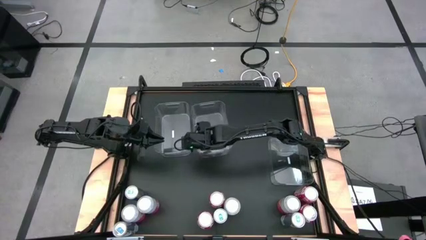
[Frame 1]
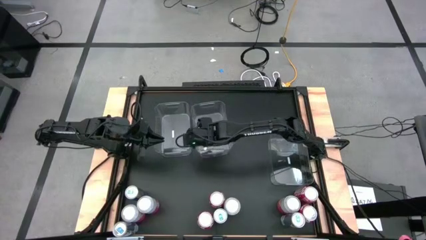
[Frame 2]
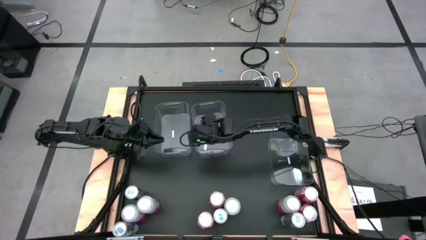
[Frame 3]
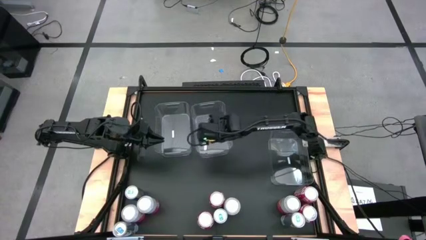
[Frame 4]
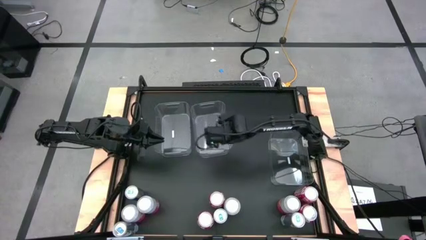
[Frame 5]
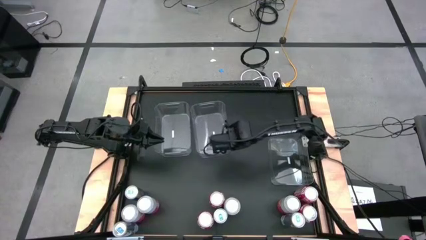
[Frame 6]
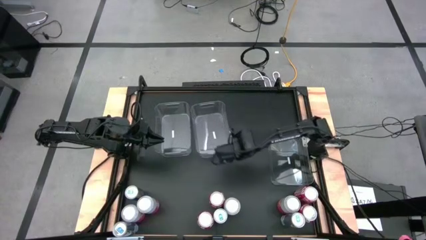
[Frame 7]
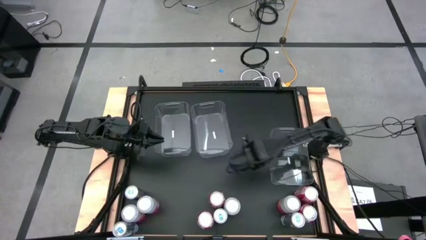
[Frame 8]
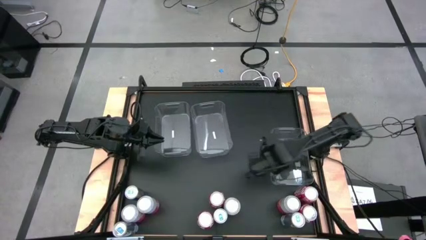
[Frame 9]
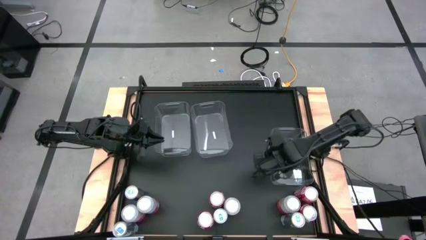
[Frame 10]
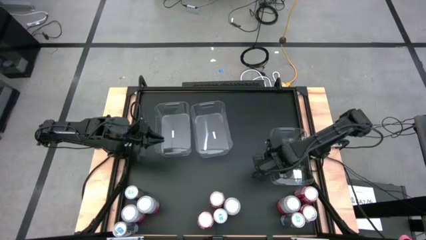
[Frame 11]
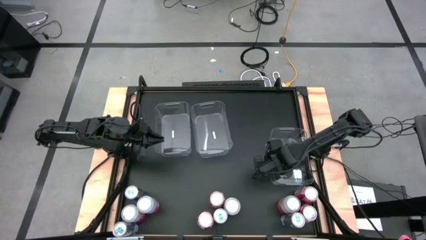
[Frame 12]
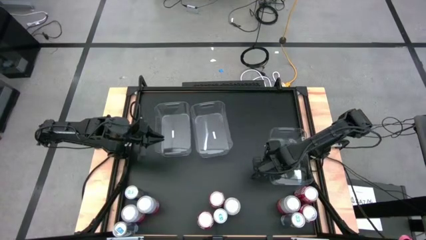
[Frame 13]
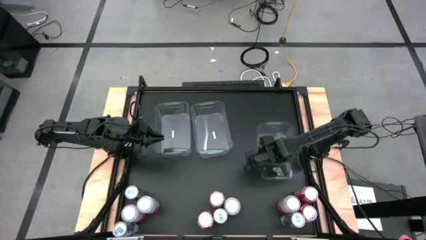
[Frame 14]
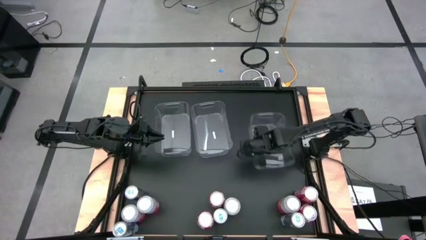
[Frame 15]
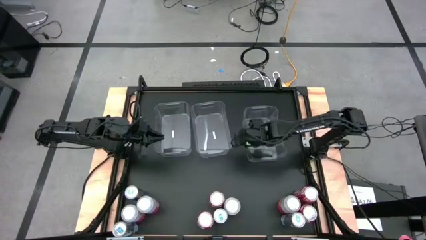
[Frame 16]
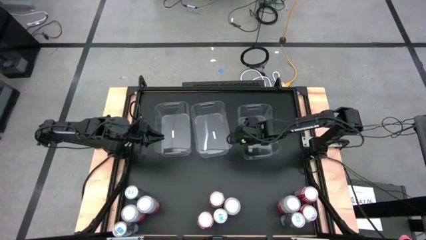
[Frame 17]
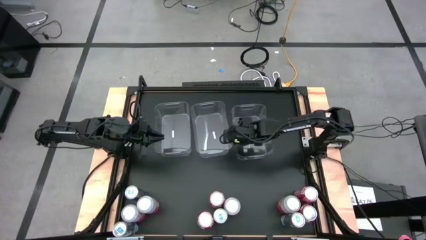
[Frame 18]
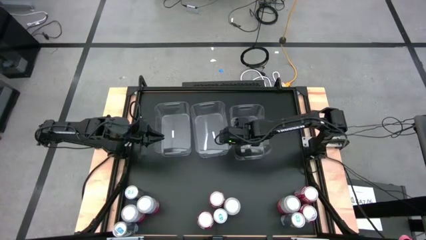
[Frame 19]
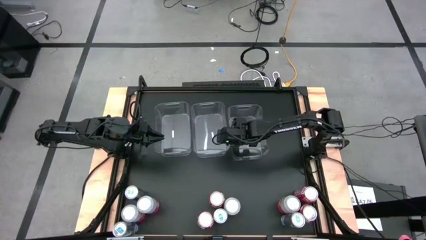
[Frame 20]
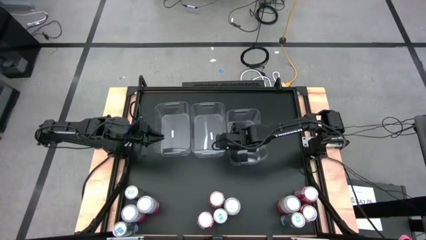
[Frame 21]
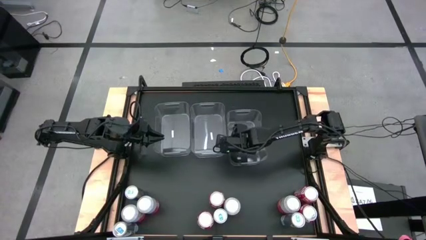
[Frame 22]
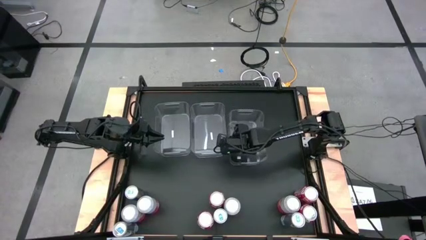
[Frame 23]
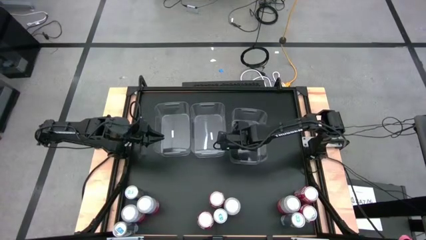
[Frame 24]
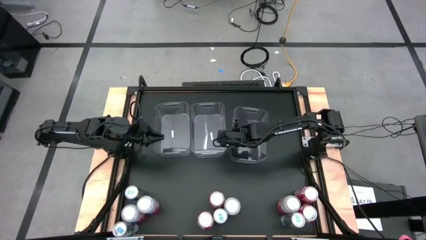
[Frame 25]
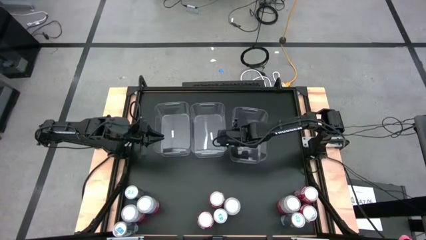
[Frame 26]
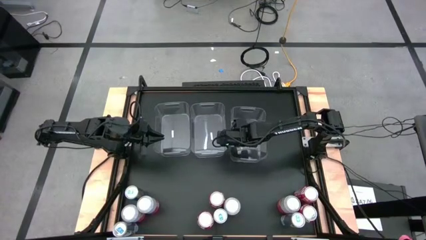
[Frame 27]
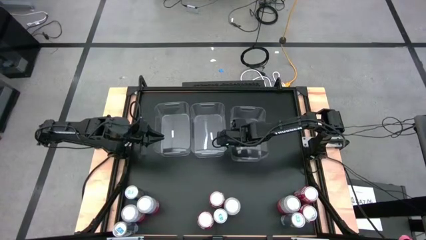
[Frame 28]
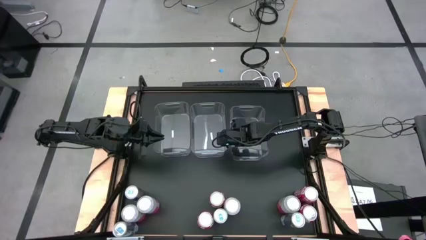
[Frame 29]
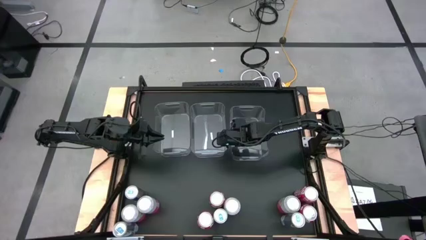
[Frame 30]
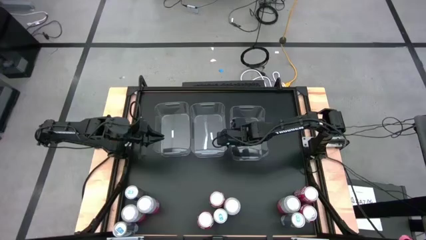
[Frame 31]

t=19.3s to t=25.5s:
Task: Sort soda cans
Move the bottom transparent bin to the right side of the middle transparent bin

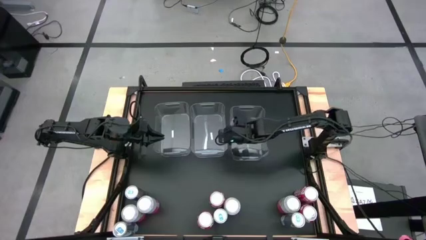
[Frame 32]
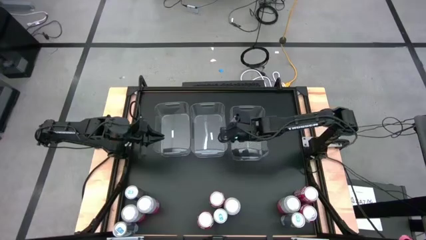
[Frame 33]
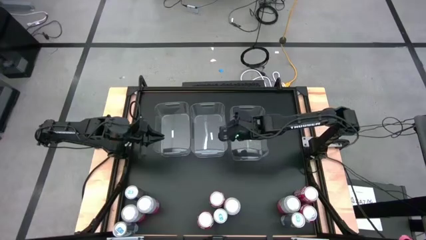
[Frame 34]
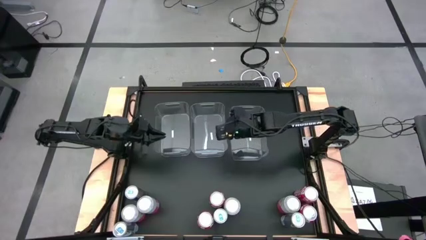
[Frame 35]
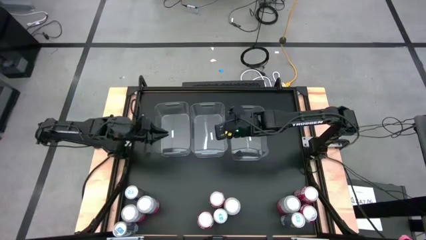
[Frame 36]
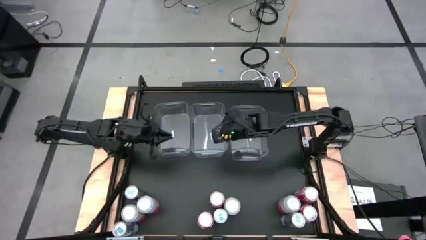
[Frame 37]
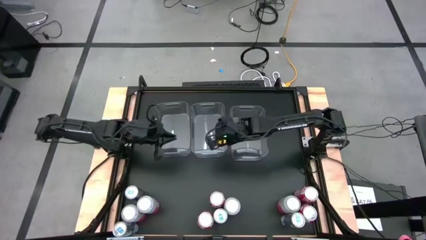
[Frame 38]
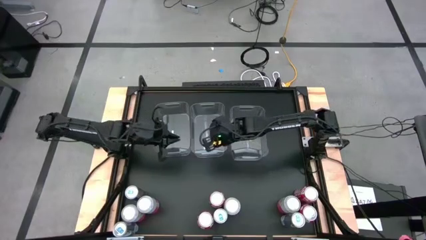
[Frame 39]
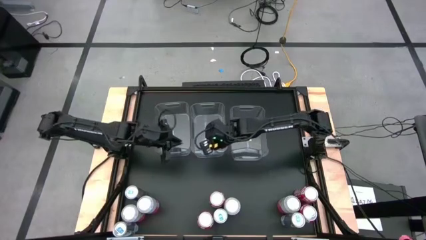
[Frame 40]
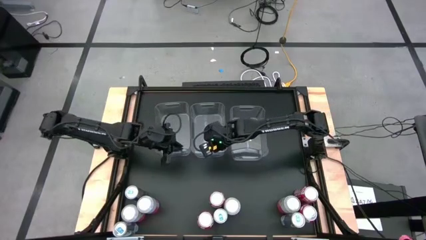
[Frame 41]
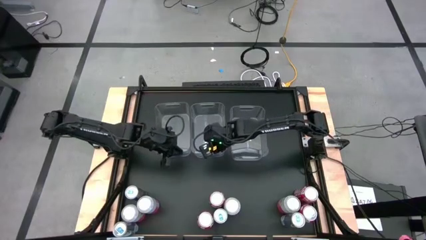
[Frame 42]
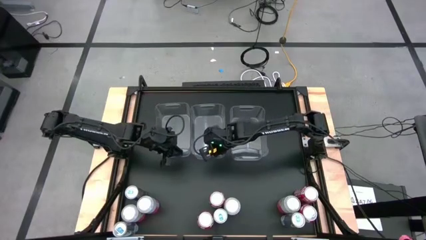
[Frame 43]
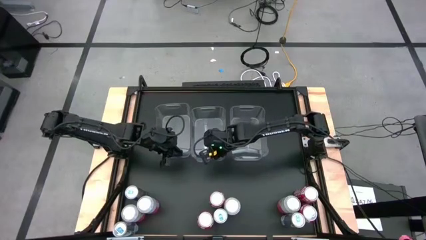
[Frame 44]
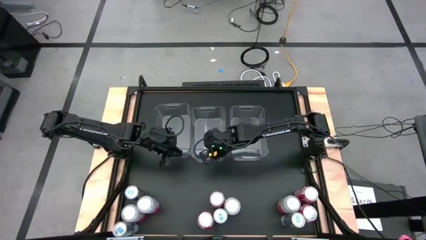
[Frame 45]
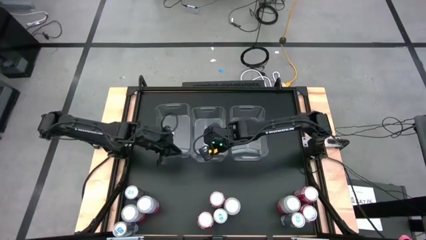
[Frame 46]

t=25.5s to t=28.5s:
Adjust the transparent bins

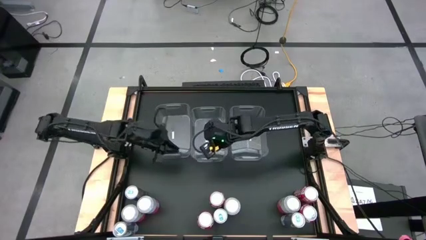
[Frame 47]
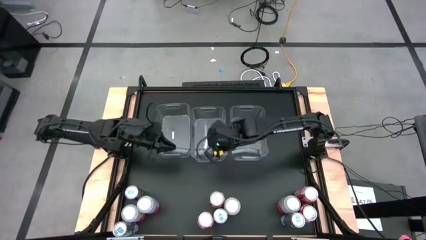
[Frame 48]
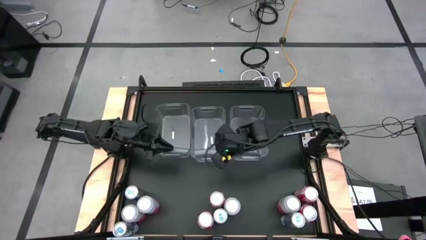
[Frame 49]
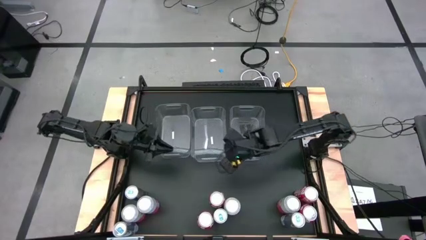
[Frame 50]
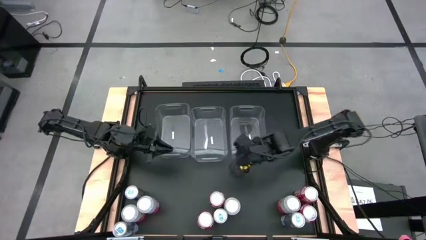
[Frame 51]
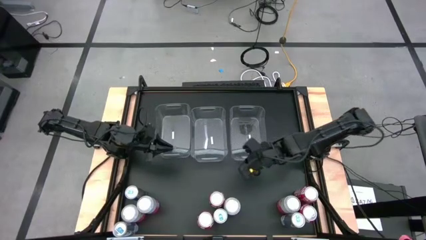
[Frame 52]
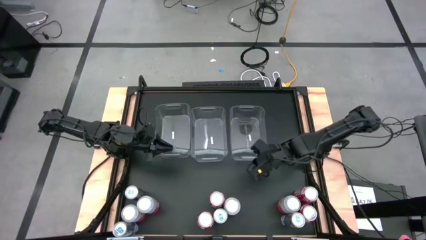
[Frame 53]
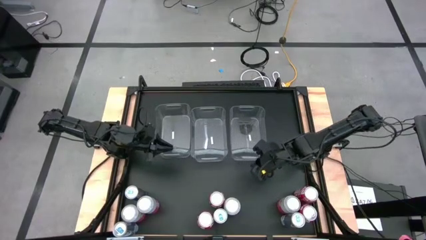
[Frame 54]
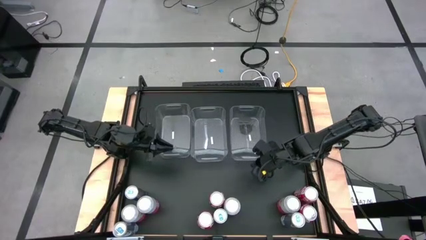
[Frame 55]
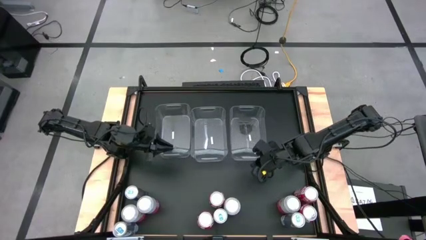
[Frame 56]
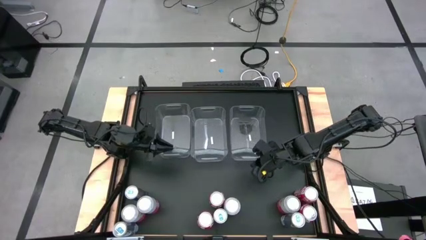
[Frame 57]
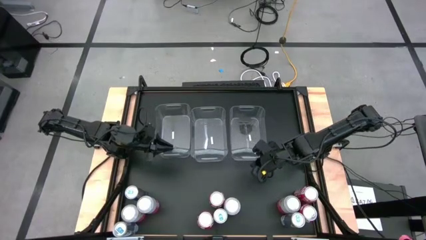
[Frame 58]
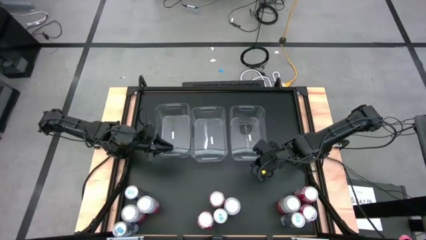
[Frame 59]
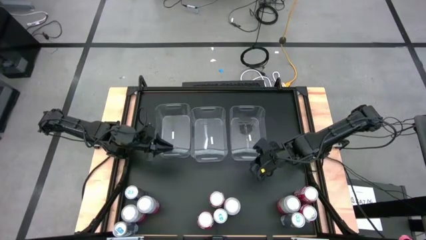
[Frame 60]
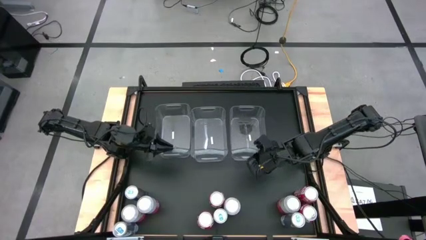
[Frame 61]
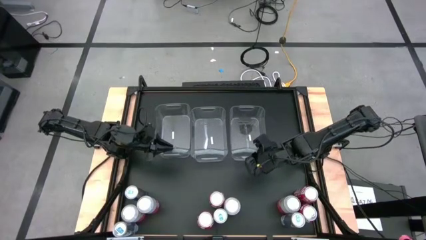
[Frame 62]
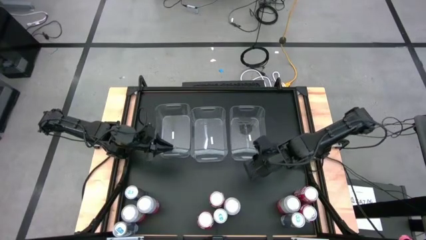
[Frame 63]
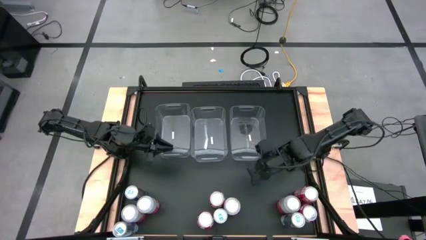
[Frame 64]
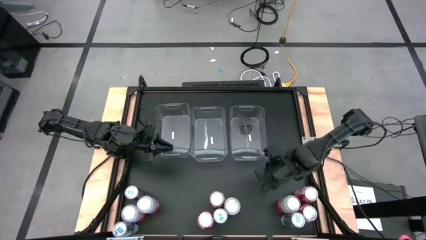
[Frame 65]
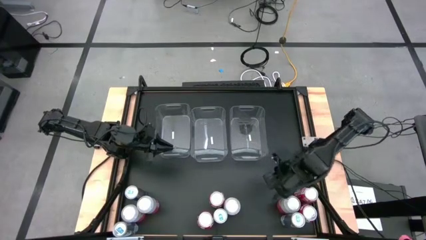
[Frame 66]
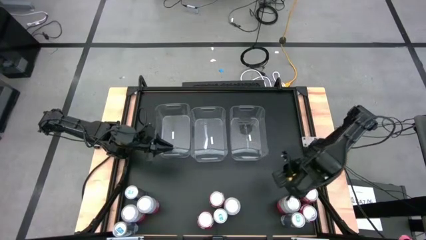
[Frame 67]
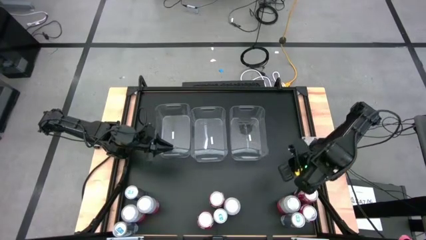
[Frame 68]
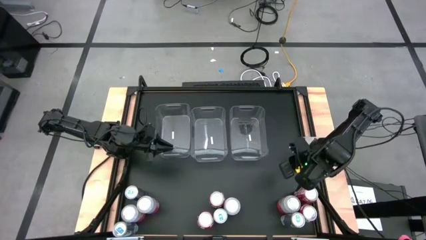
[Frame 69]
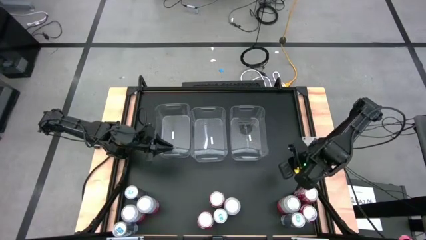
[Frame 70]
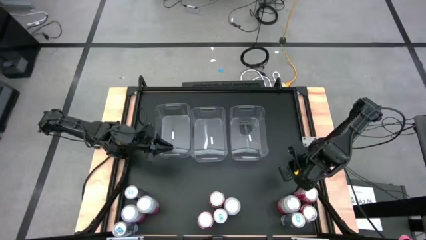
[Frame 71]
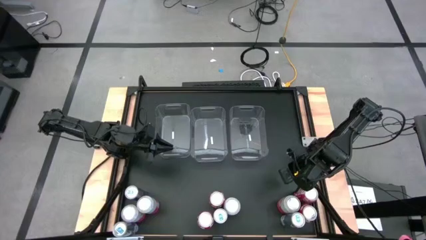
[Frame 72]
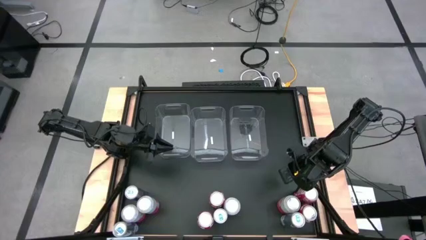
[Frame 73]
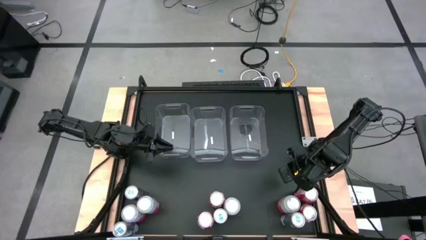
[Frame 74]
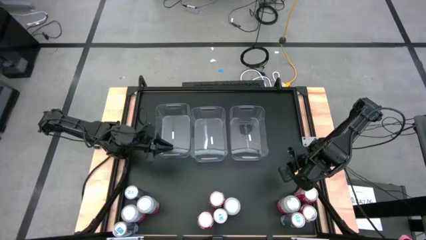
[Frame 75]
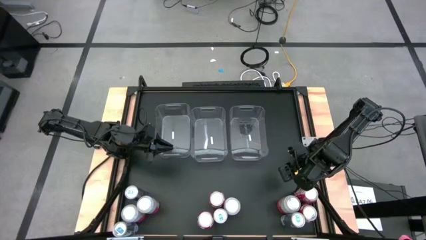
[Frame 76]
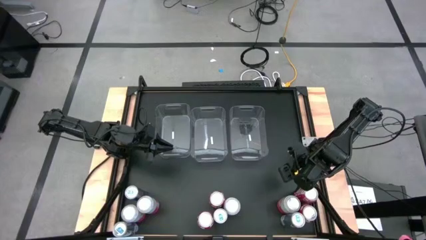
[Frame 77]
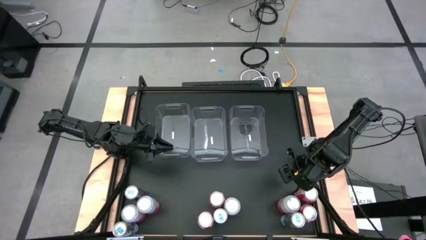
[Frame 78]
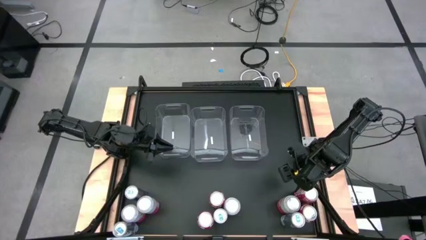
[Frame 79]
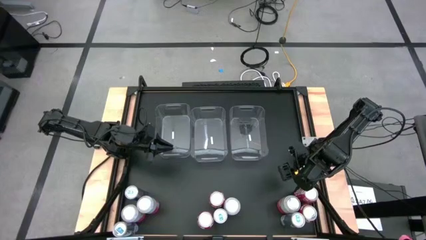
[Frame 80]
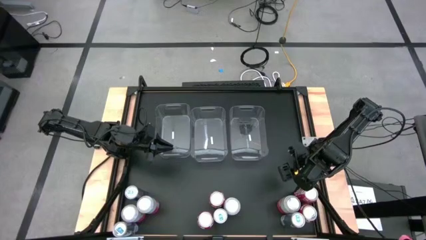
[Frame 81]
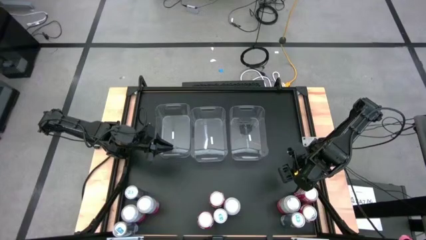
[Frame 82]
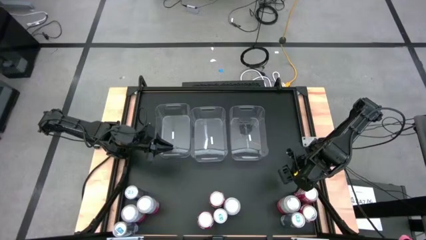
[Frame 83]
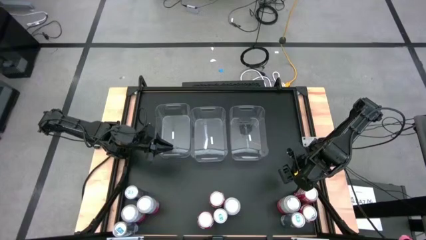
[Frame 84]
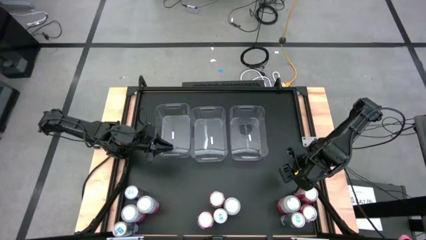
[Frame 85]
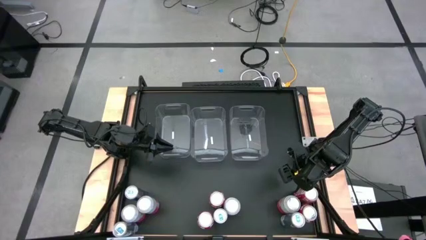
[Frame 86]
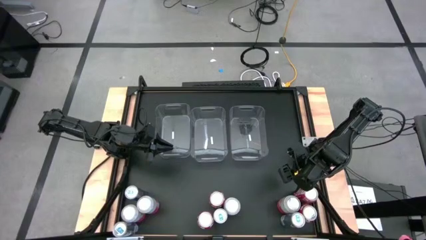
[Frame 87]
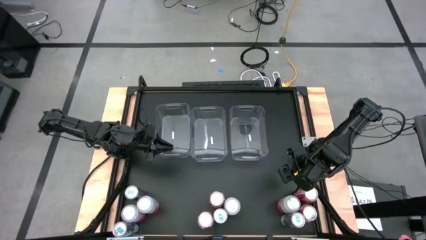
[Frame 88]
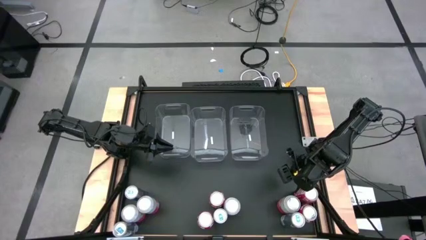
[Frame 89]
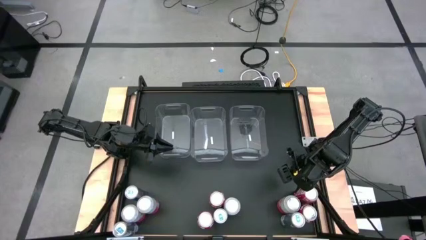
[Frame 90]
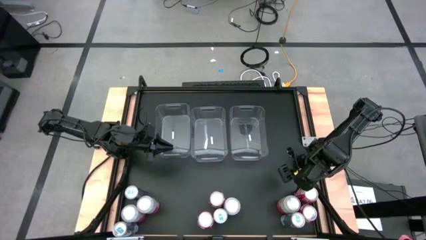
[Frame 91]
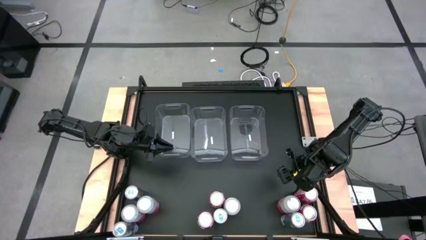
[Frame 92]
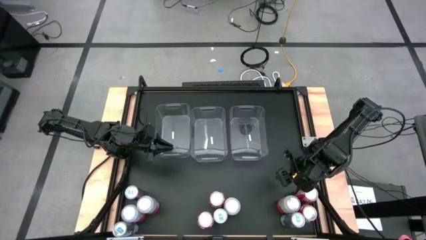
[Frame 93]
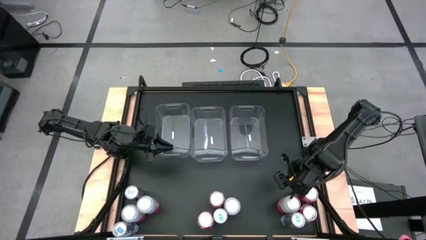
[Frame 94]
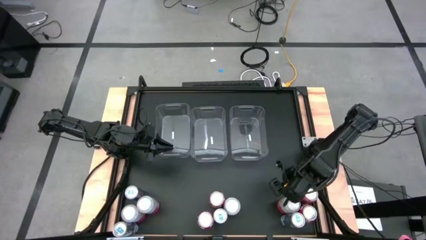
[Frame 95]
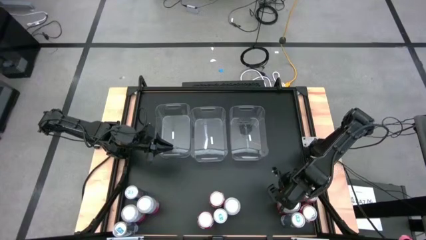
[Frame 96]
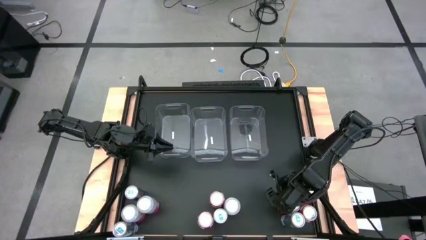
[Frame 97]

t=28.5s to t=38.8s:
Put the pink-white soda can into the middle transparent bin
